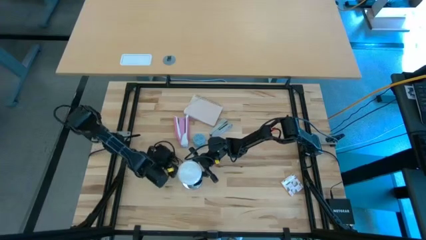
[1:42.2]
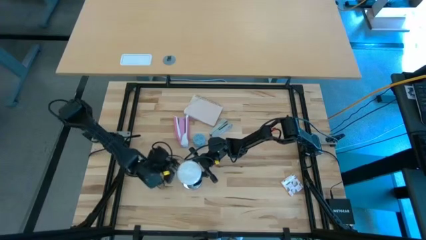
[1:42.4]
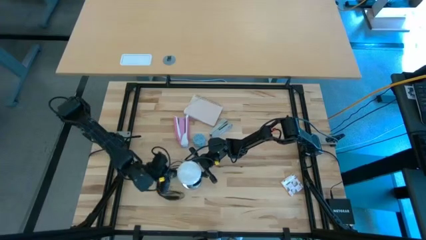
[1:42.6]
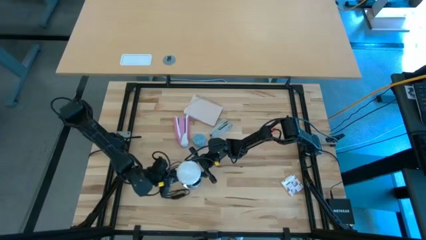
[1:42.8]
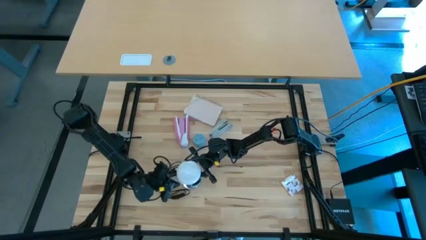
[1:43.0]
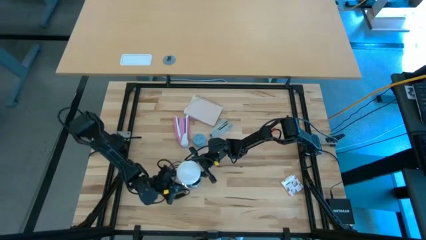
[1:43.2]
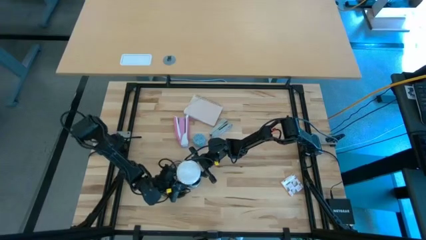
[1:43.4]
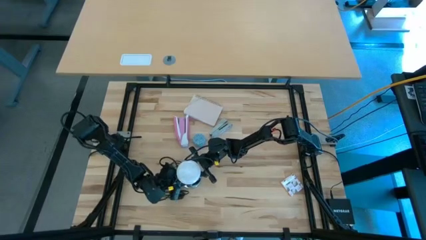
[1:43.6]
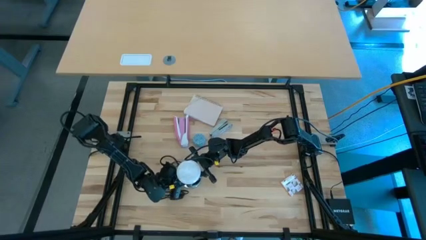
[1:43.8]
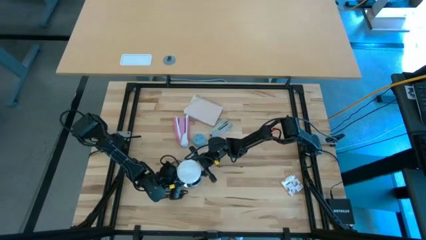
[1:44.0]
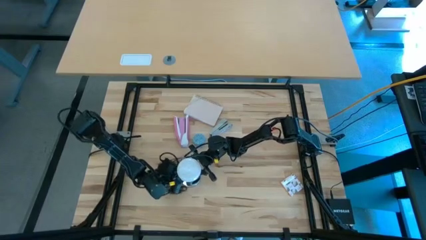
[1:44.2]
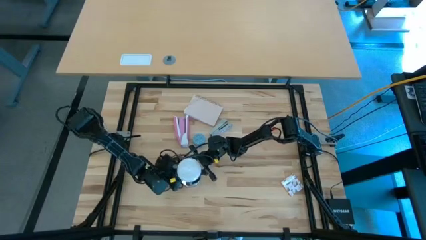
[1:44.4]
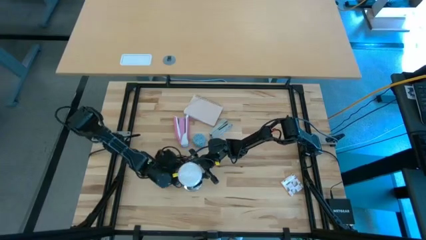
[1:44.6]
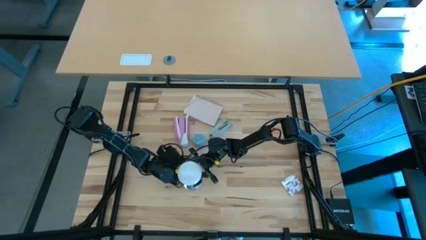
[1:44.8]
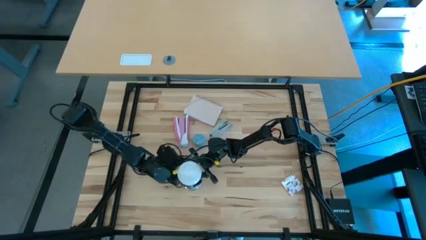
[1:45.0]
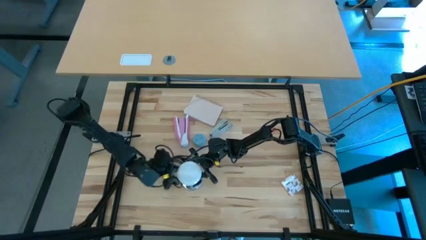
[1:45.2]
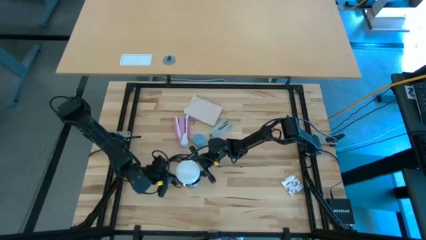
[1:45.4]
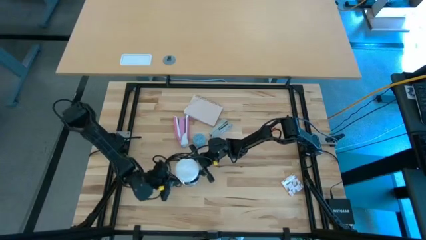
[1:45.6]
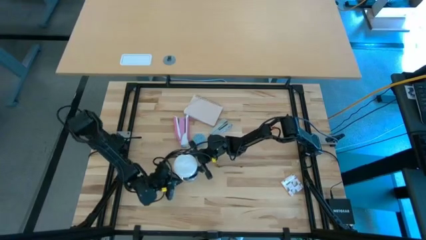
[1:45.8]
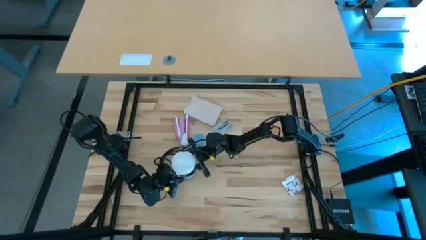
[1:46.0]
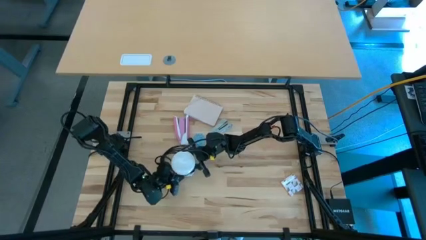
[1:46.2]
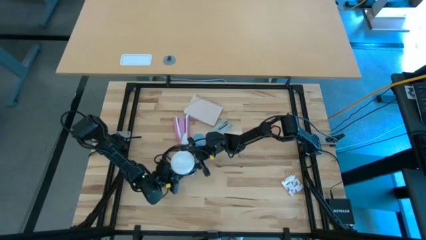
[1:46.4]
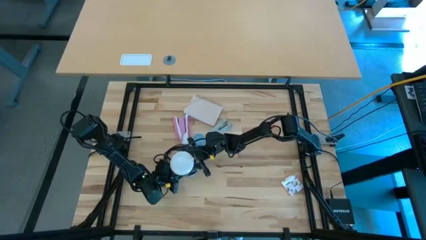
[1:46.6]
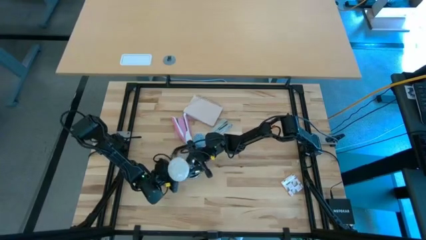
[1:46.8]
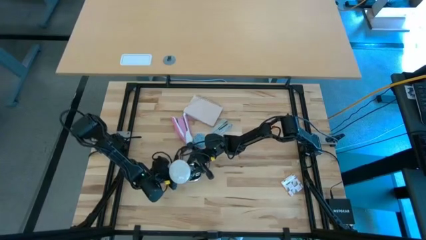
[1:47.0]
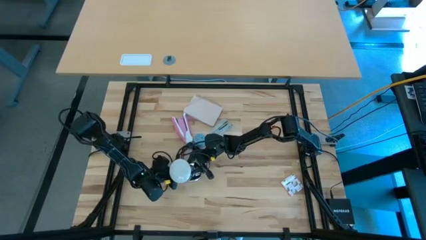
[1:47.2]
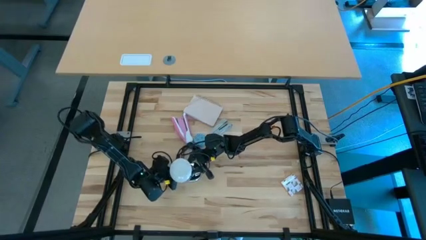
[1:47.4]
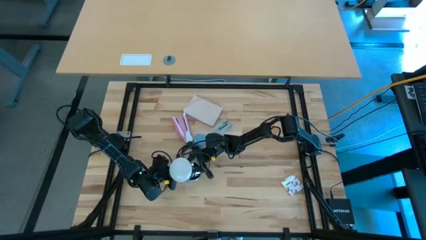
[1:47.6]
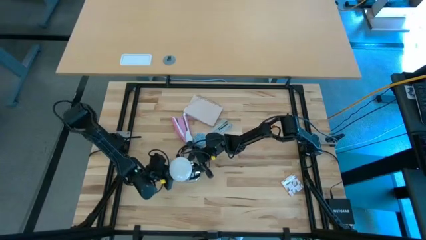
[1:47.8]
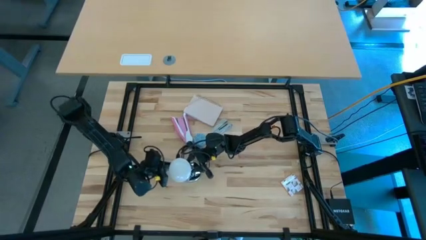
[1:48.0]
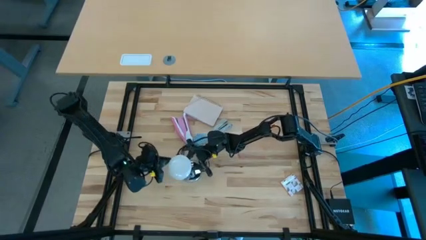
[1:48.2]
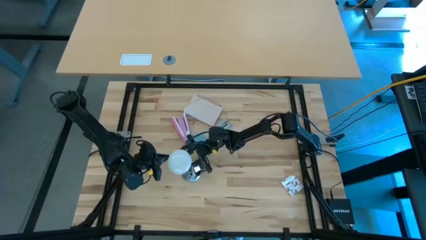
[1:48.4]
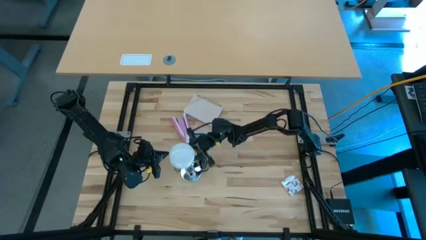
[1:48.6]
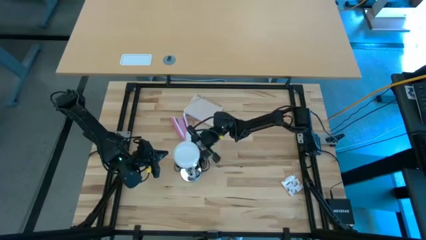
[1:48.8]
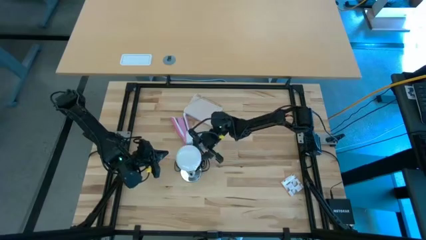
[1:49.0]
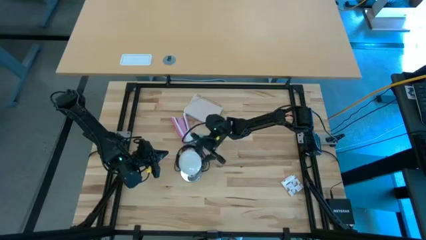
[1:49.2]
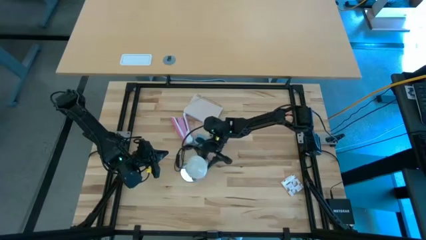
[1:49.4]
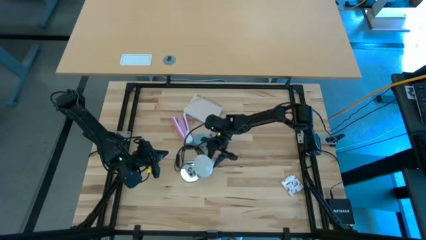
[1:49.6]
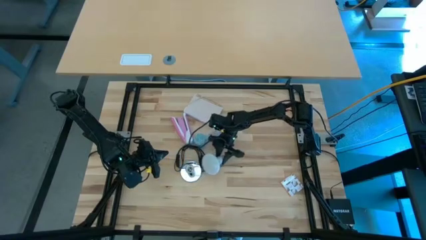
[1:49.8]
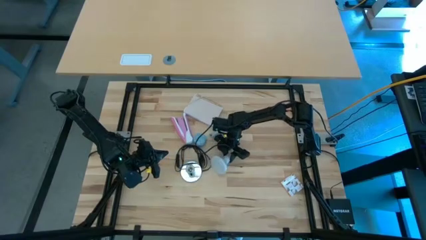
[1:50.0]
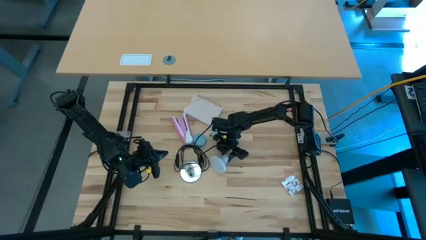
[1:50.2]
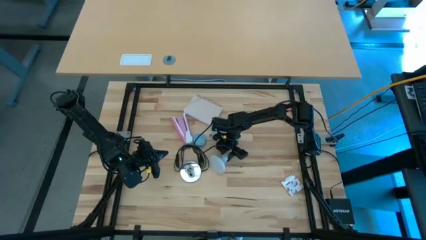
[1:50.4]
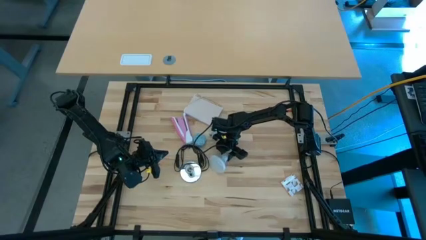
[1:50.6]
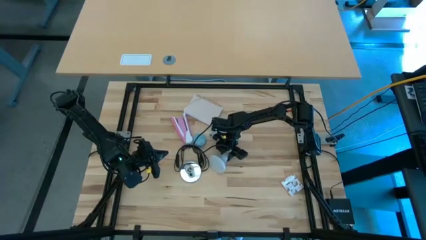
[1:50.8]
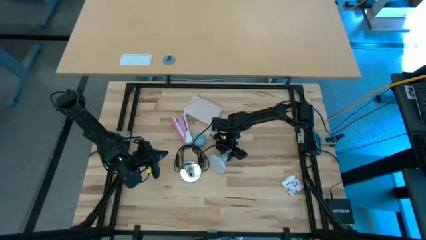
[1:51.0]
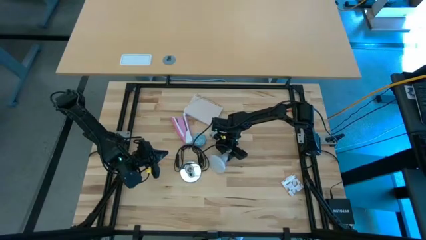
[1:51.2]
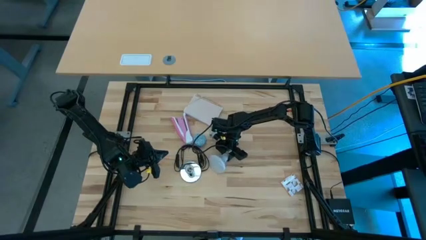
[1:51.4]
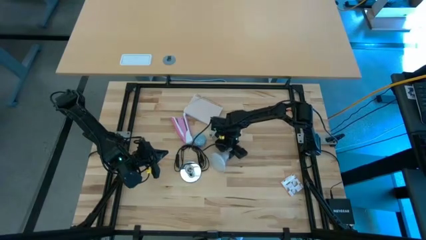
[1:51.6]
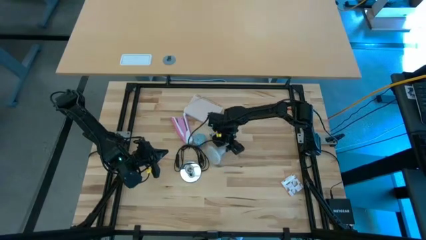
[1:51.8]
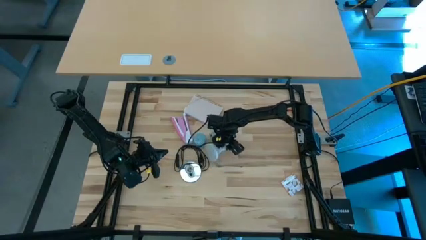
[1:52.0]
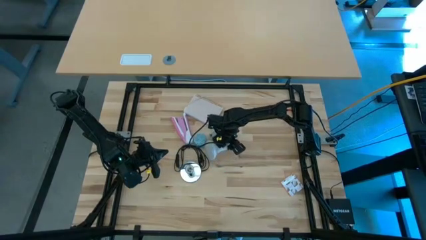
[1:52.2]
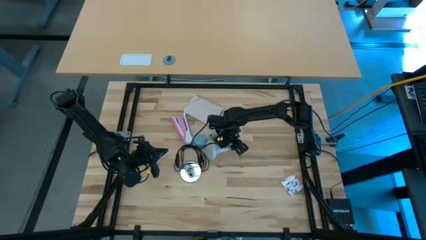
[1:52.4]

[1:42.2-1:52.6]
Task: Screw lightbulb
Remove the lightbulb from the lamp

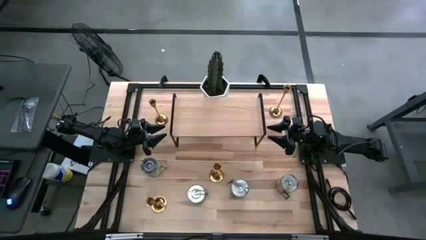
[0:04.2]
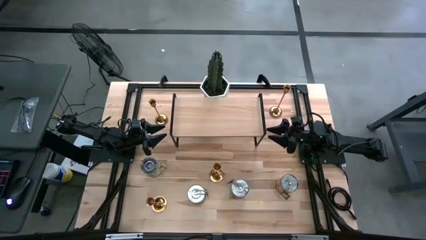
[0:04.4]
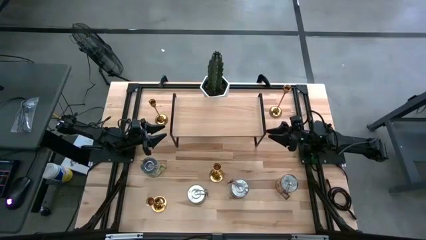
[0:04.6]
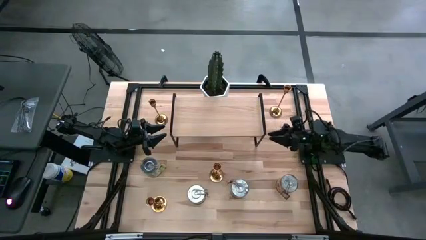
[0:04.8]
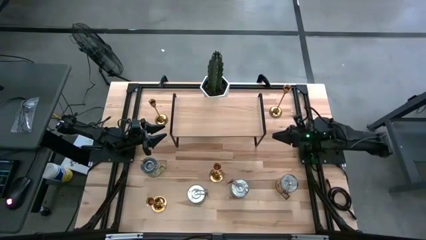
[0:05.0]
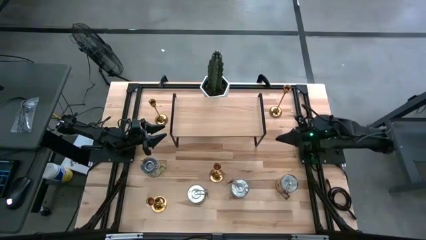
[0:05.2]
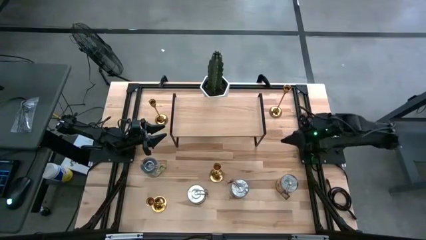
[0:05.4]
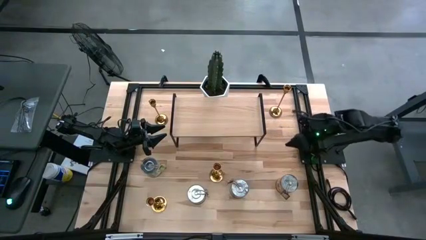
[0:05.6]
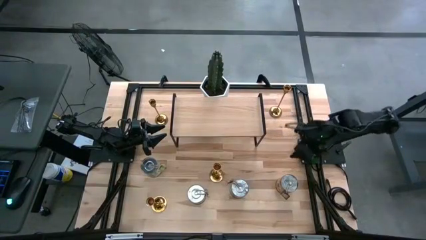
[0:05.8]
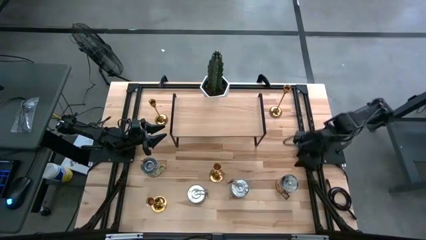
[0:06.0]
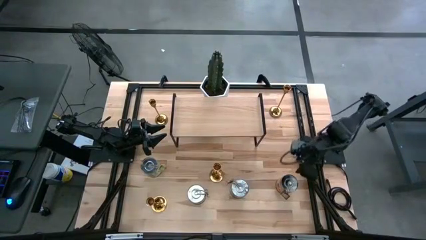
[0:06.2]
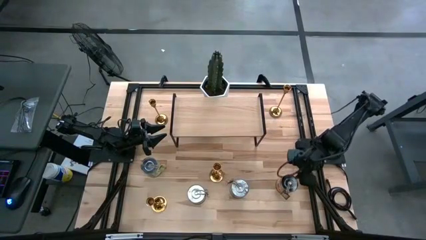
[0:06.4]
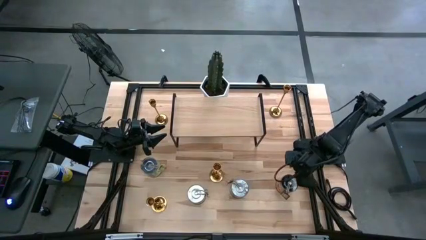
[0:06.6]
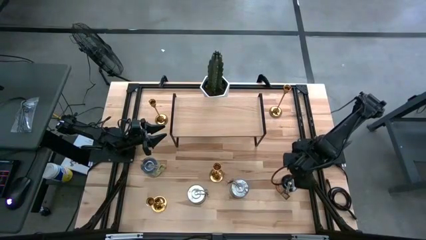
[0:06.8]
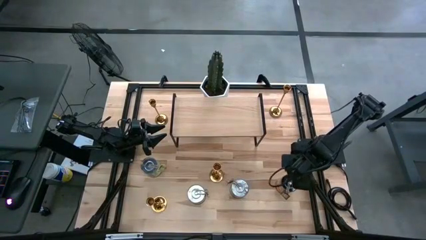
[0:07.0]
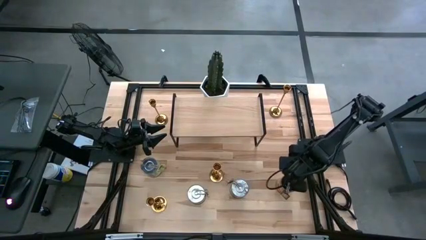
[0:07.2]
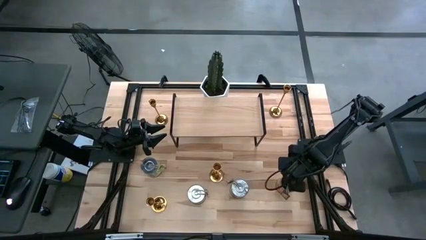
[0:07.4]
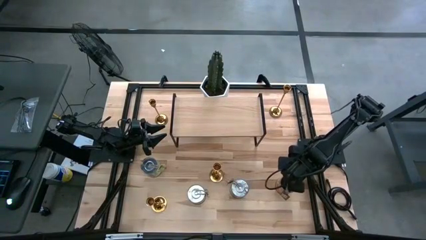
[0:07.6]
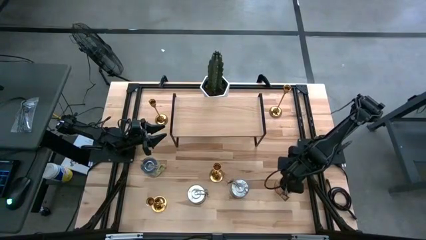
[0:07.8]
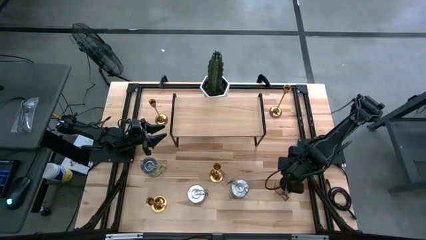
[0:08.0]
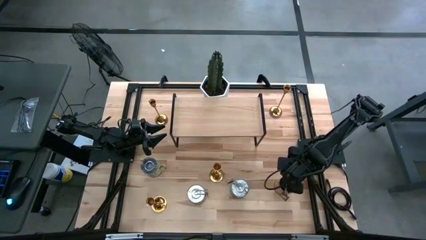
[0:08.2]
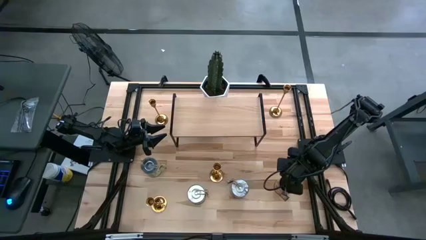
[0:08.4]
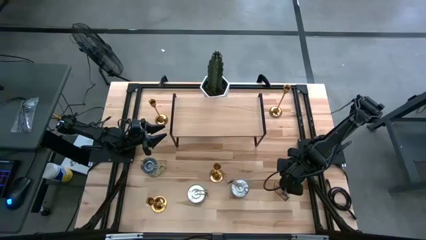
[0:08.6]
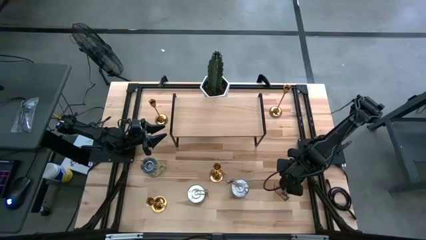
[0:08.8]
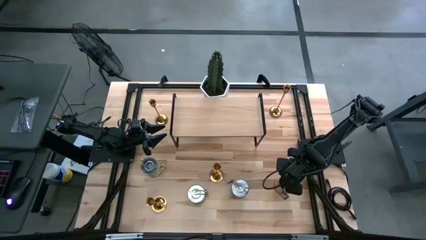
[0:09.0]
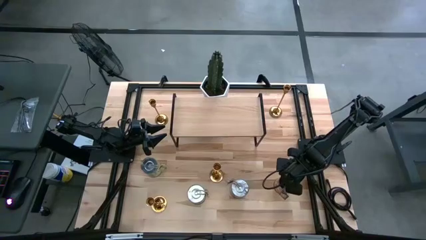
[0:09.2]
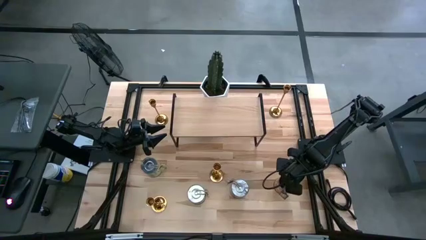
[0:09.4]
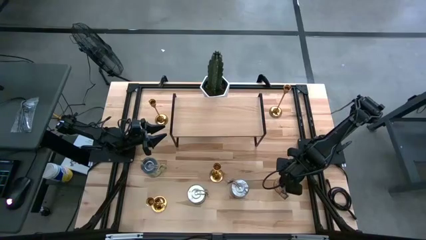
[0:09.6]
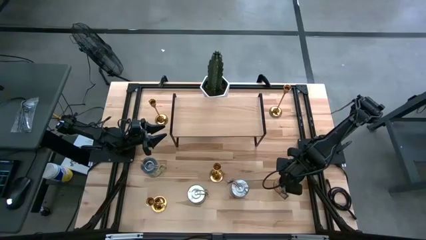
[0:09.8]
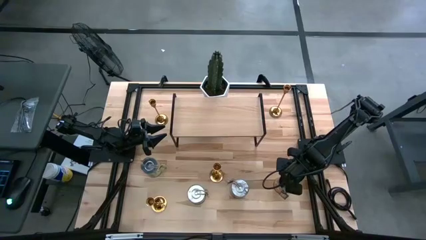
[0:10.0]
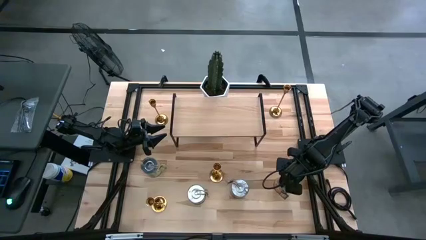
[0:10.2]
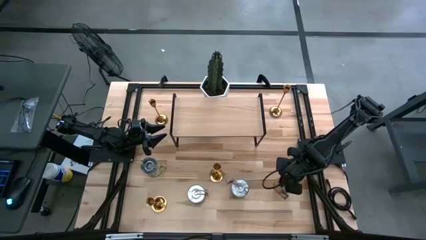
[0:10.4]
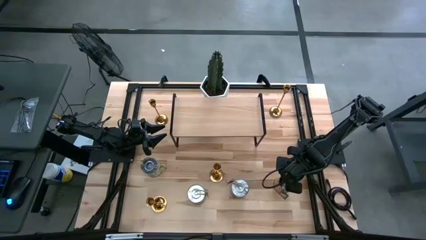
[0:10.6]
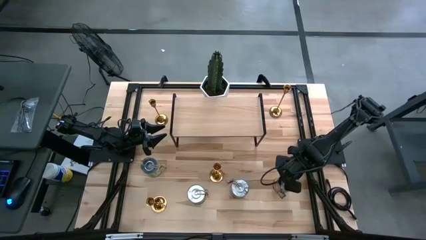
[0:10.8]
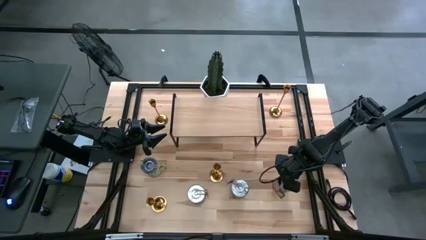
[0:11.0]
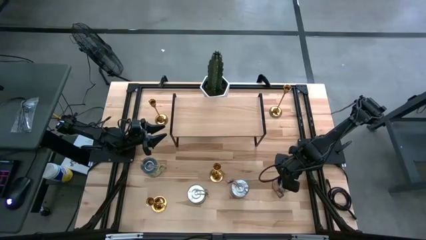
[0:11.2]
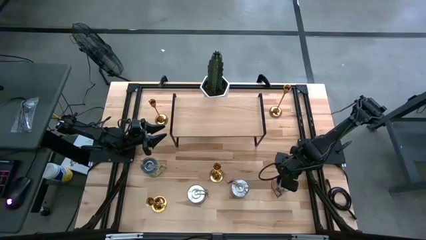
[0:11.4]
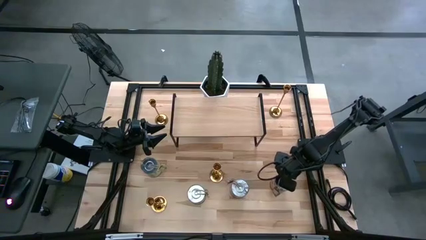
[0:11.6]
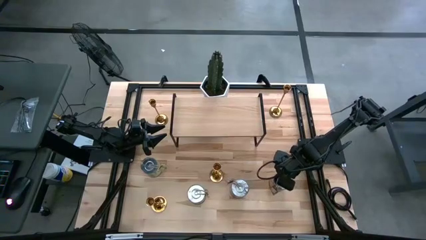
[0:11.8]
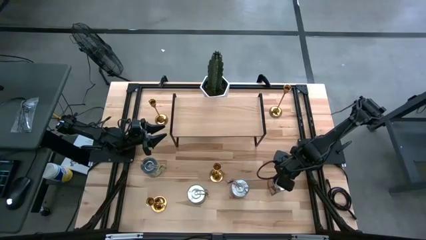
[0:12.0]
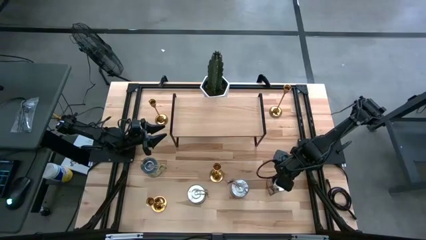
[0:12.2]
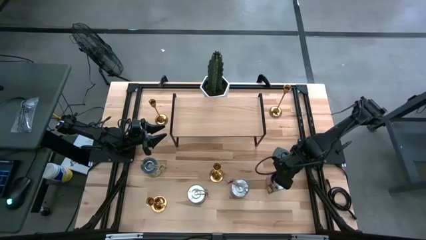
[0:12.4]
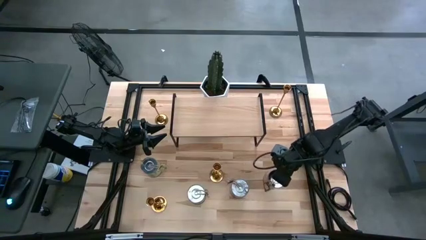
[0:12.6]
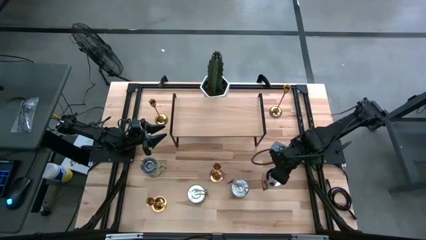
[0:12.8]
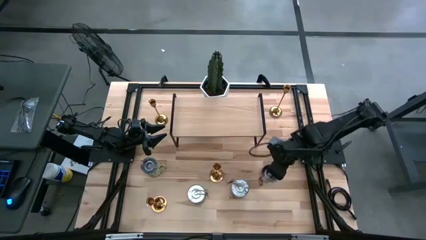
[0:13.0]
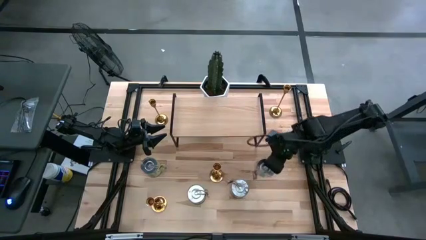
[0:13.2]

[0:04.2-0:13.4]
Task: Pick & Place candle stick holders
Put the silver scented candle can on the shelf
